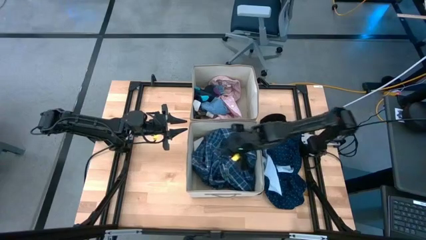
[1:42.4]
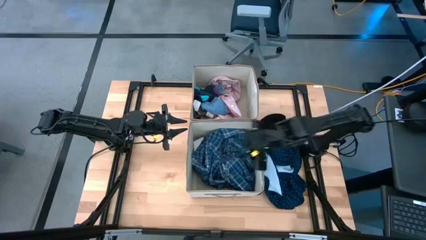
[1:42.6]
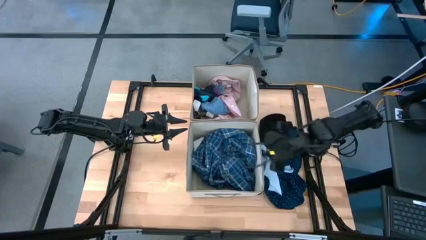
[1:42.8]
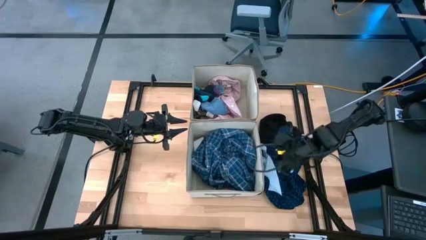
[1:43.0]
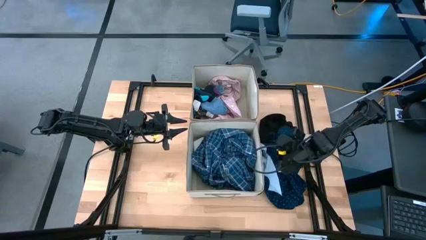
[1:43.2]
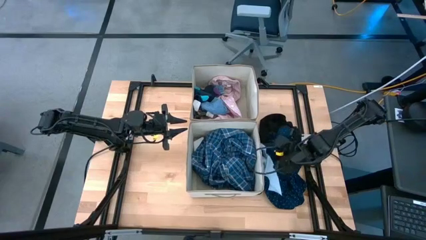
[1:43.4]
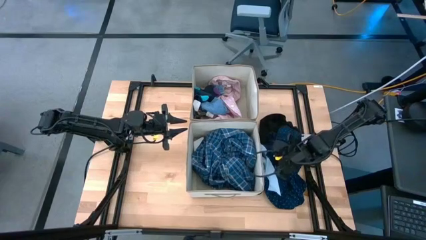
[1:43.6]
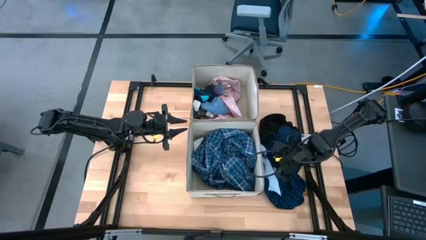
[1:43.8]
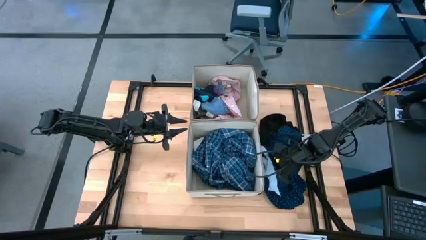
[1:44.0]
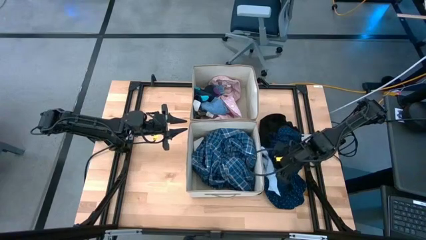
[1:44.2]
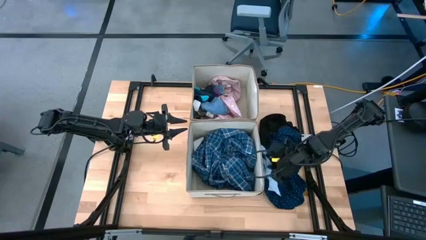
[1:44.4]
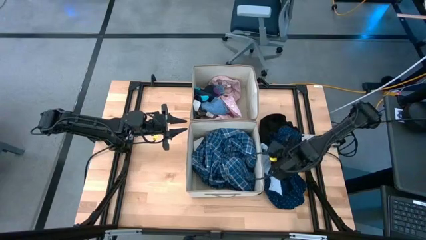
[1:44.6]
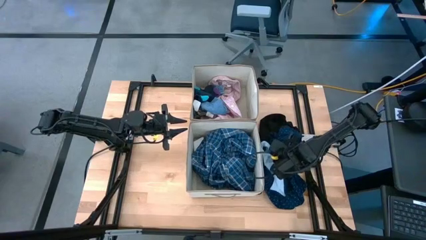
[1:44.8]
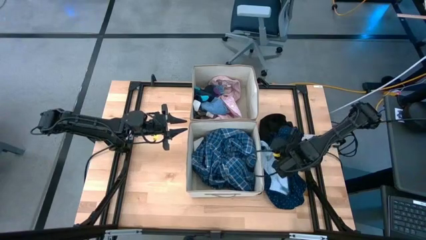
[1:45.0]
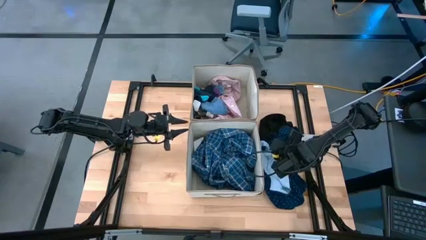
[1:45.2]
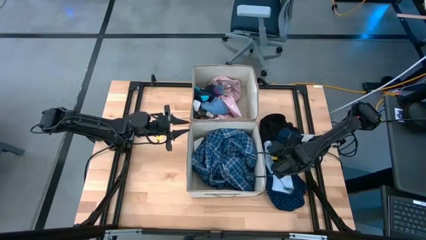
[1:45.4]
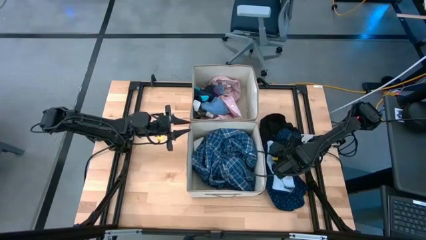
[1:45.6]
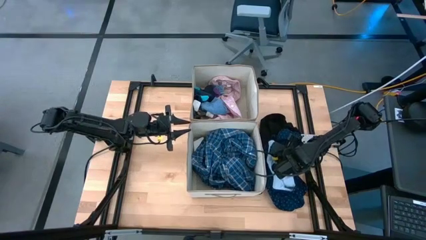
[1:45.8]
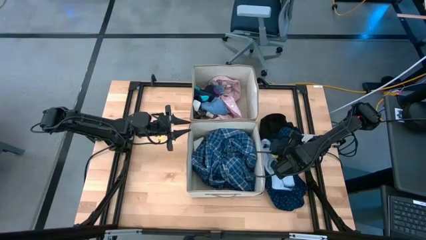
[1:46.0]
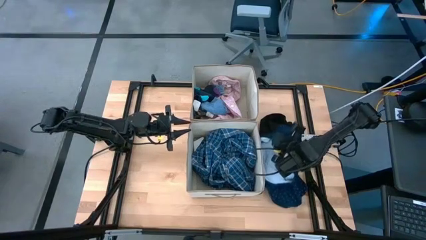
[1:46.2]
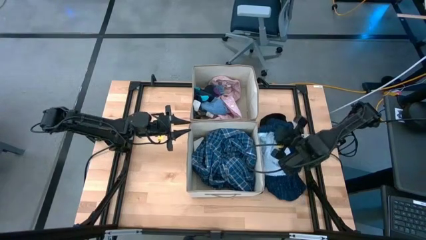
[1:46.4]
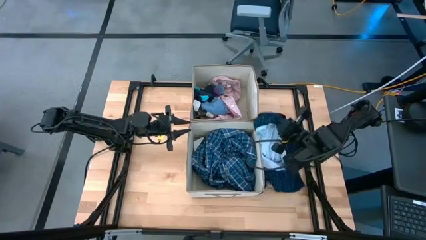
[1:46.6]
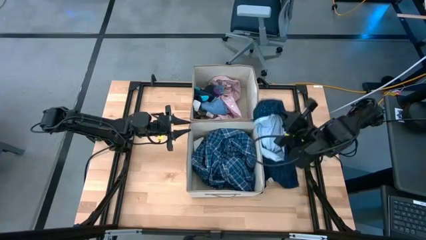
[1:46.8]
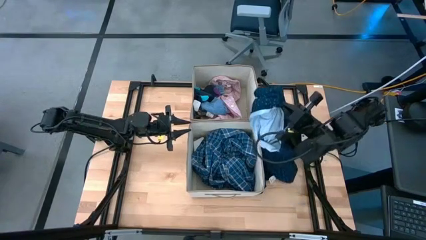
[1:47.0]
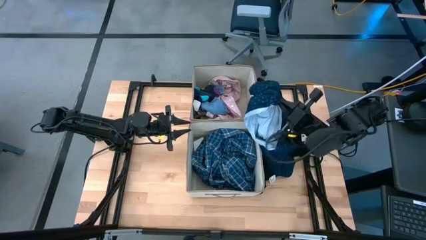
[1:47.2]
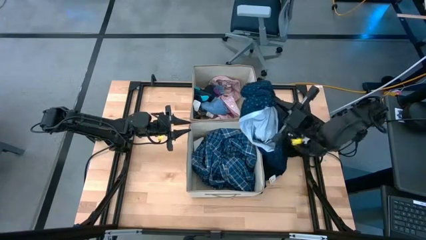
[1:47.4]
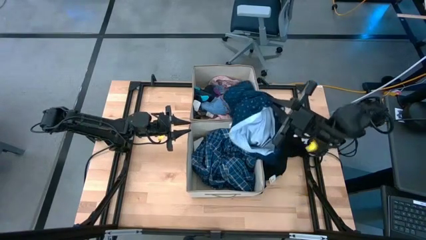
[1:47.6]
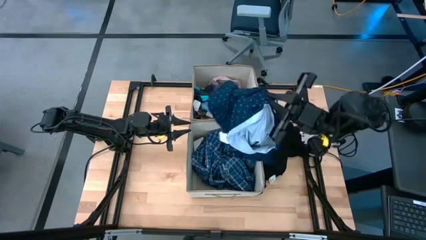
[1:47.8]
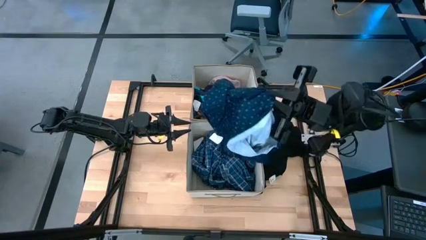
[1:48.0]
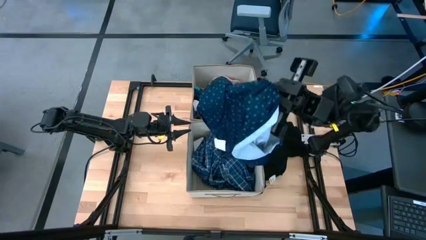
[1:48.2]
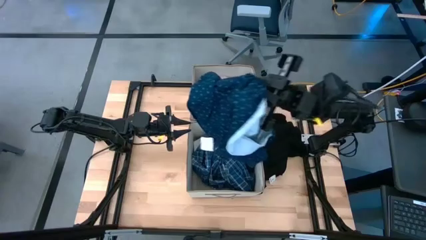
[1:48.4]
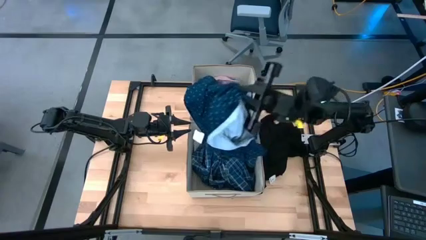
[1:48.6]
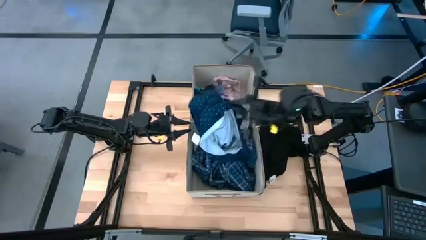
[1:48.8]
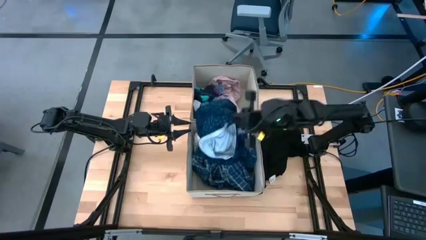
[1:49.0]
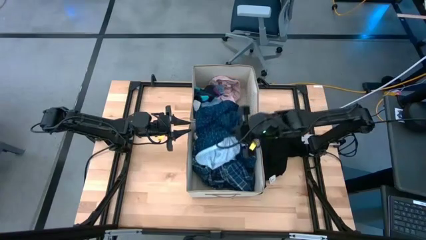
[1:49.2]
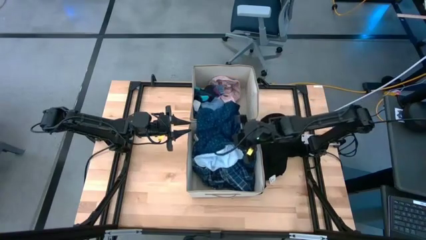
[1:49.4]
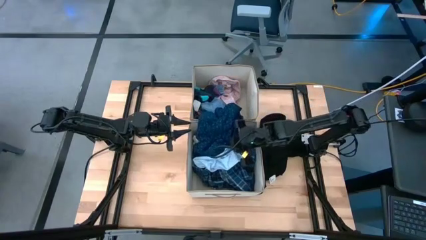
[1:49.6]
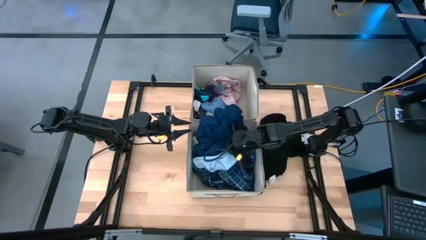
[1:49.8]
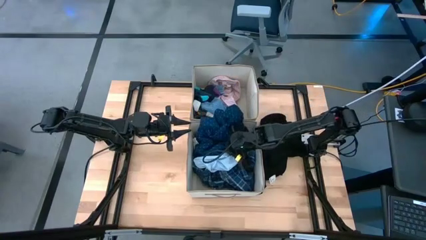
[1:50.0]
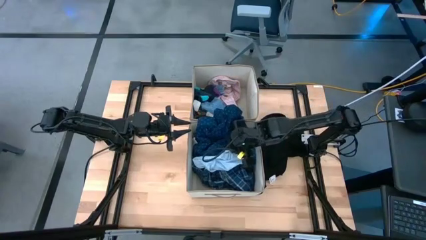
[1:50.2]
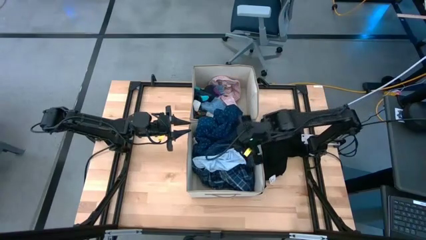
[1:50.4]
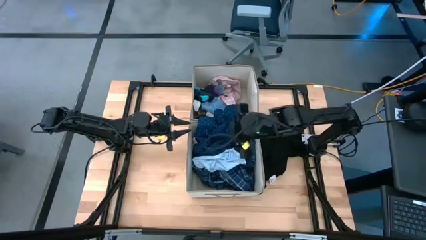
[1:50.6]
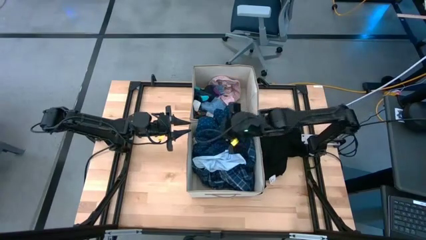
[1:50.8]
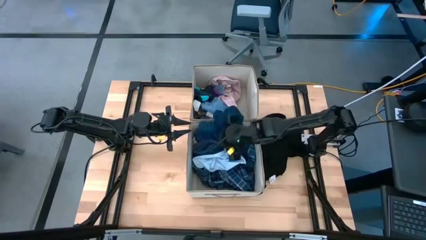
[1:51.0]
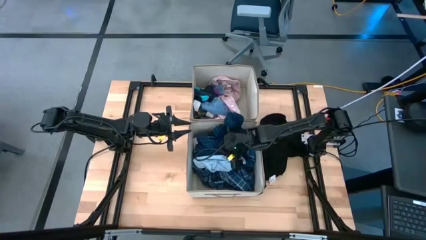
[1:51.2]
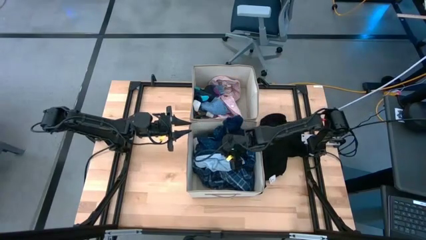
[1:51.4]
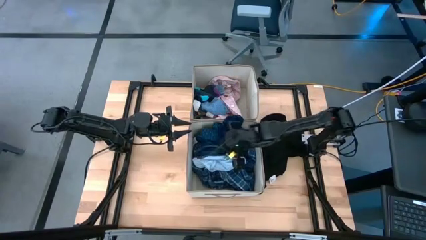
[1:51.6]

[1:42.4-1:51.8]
Task: Sort clothes
Put the dark blue shirt into the bottom laundry organizer

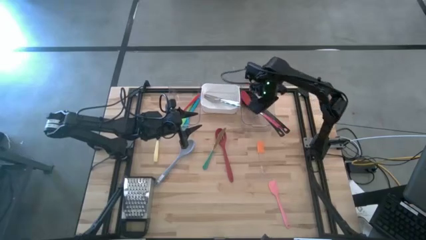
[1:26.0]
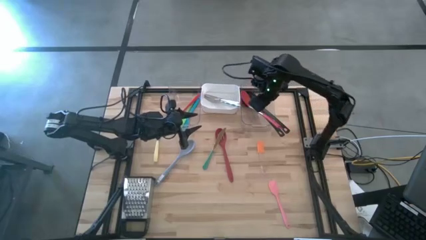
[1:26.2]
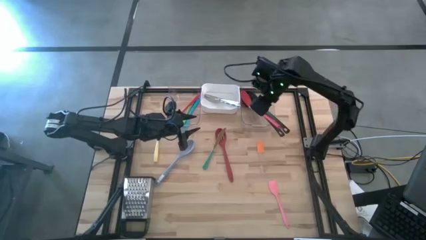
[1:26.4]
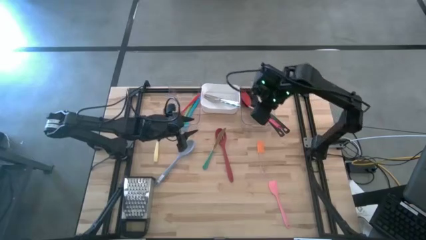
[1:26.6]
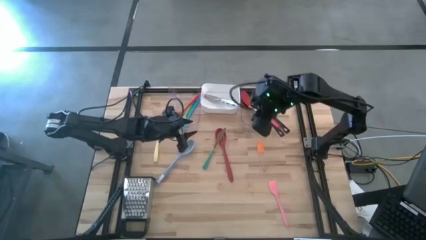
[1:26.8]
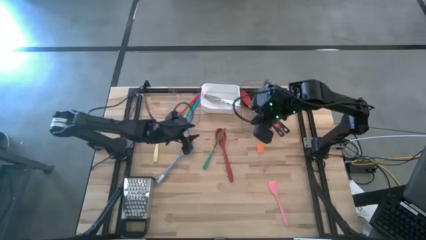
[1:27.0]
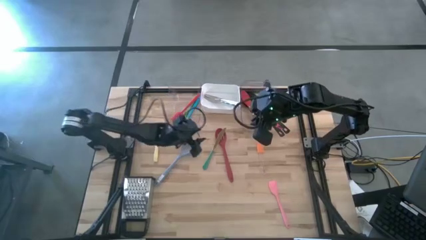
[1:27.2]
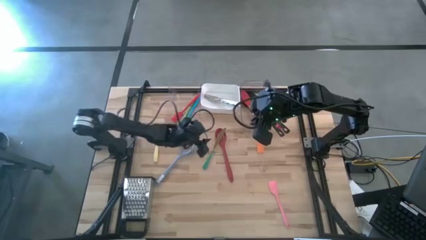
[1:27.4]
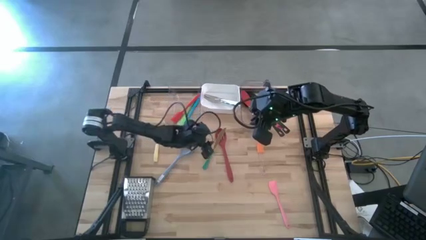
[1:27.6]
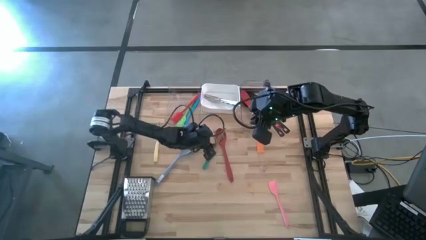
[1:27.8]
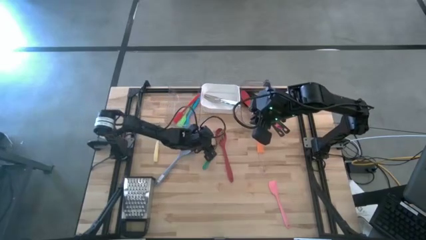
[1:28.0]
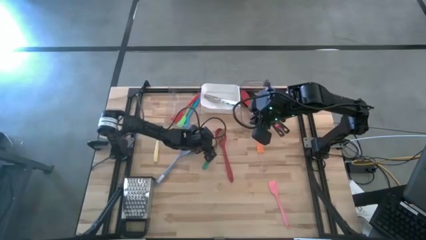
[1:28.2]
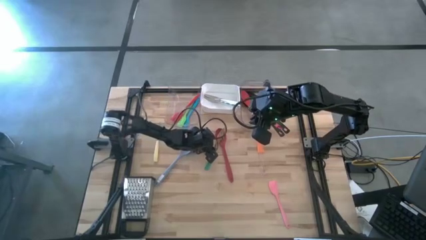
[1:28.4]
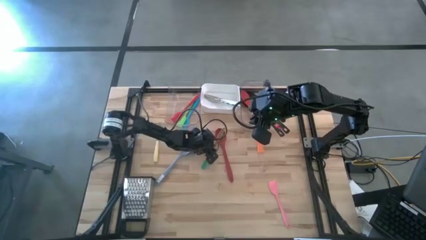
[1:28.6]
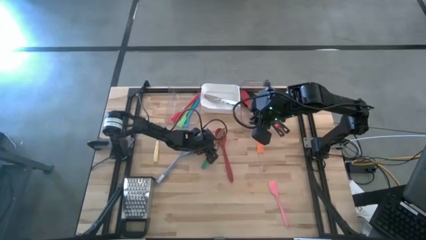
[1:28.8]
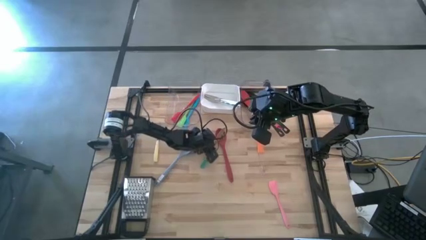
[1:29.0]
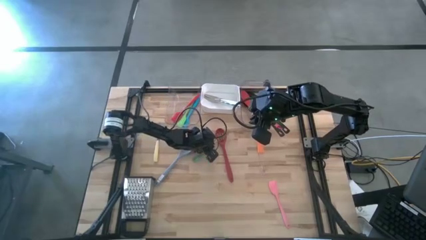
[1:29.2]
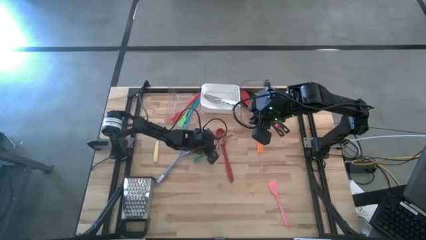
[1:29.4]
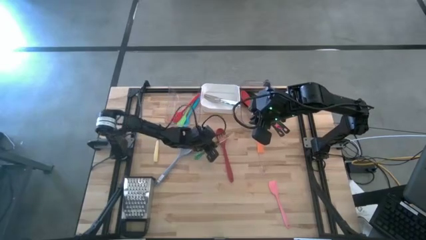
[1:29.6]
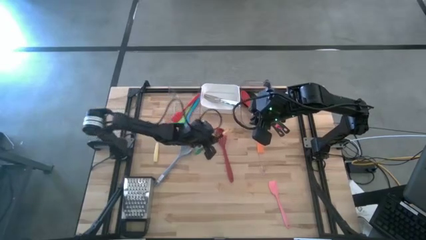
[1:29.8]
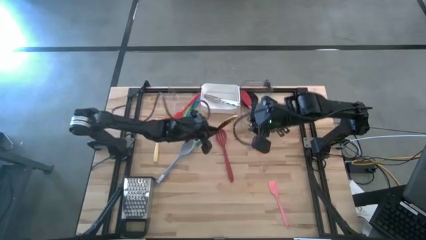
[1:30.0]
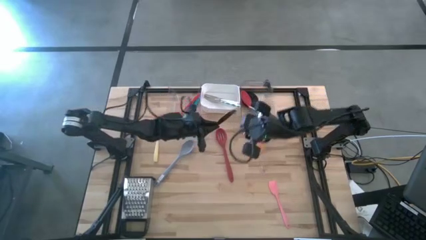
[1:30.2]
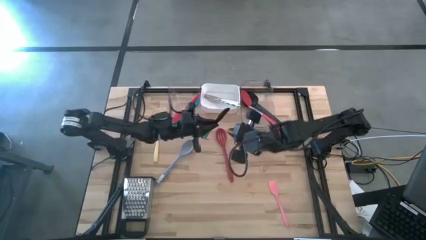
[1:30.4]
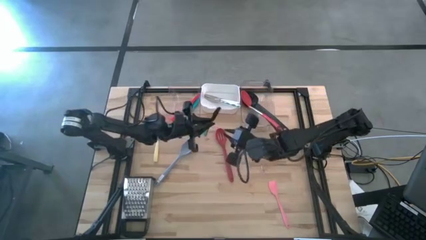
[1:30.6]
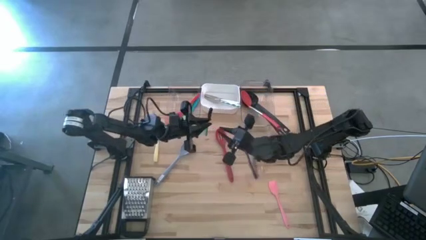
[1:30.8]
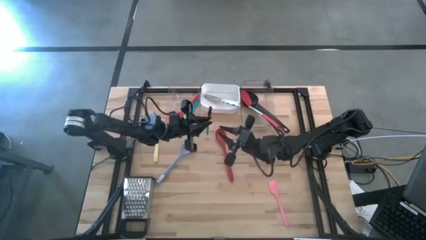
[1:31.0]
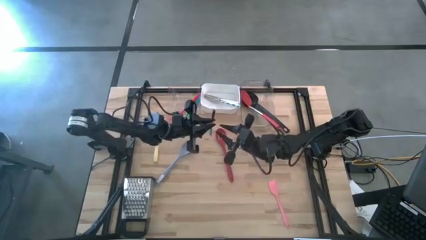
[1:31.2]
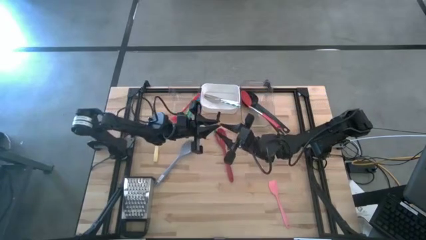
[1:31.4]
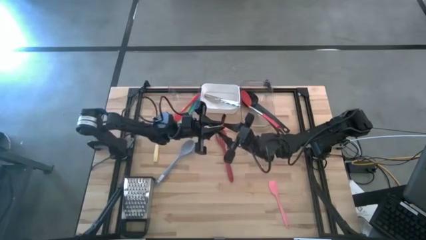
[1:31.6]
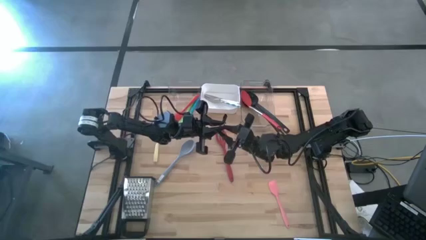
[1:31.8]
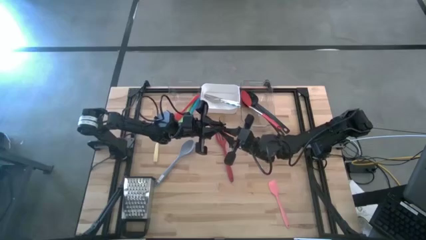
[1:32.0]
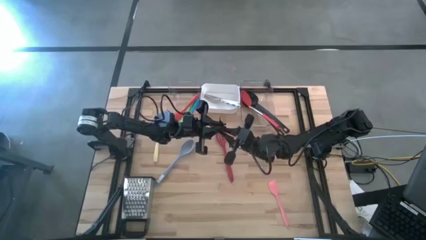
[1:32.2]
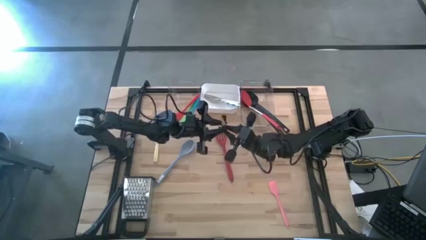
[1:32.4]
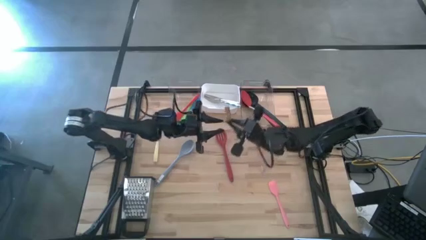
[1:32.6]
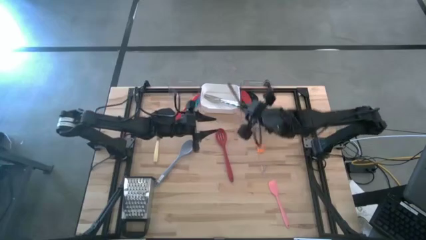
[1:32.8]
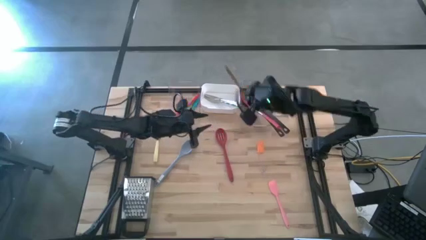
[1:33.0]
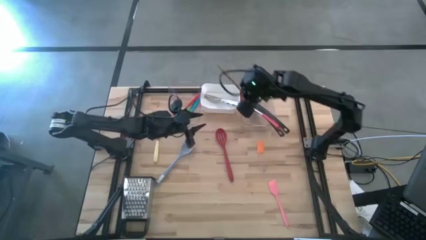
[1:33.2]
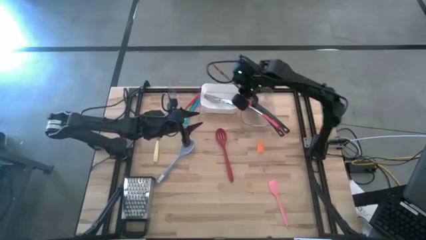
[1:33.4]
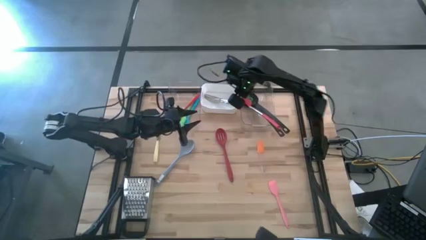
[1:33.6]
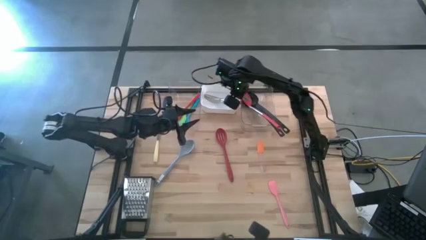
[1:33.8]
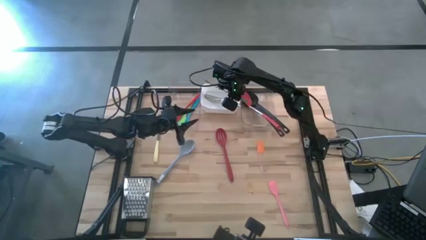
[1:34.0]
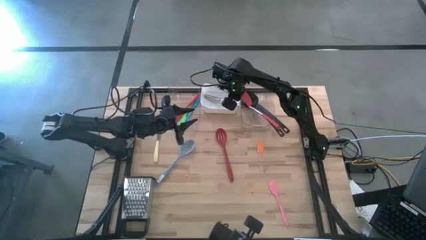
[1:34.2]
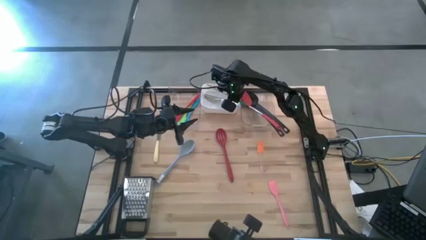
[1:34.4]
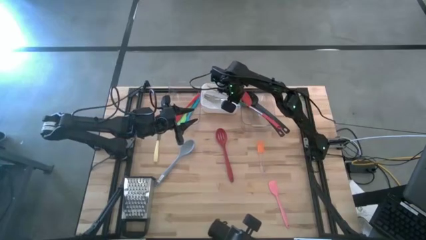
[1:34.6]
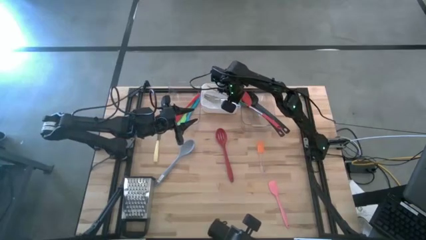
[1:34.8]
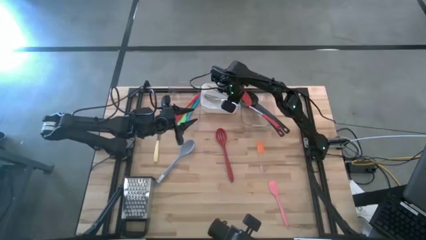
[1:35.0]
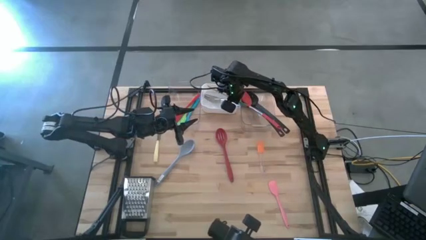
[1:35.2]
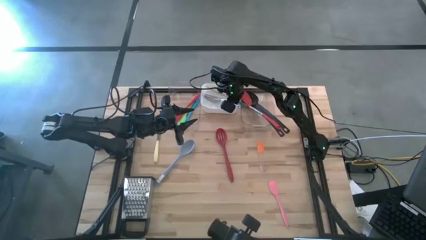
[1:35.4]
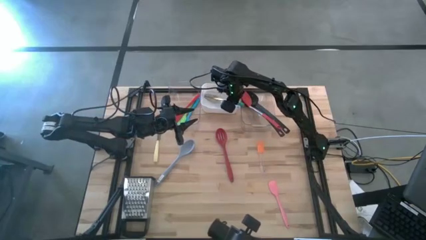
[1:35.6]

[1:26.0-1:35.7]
Task: Pick & Place Kitchen Items
Put the green knife into the white bin
